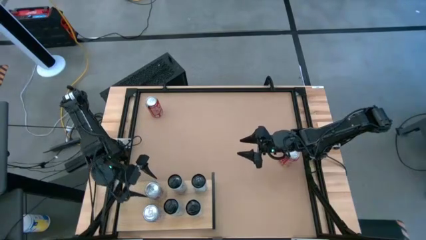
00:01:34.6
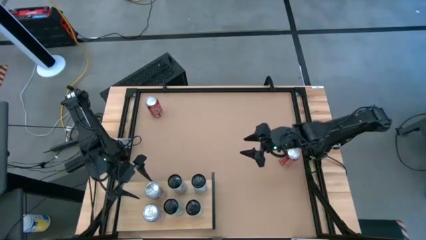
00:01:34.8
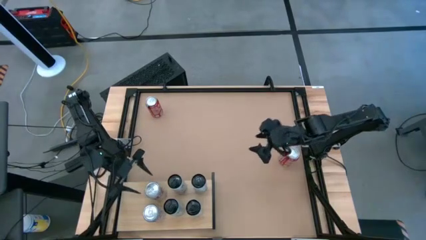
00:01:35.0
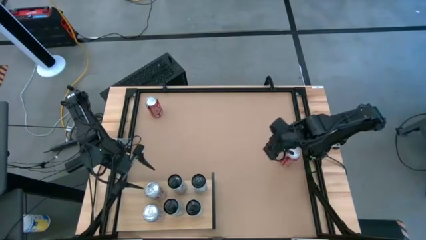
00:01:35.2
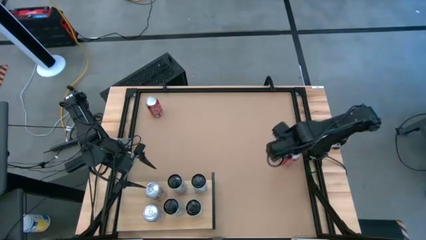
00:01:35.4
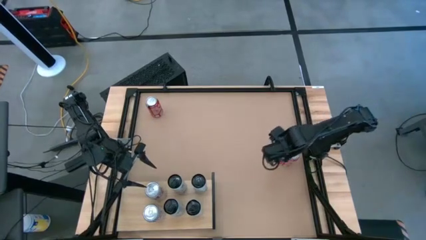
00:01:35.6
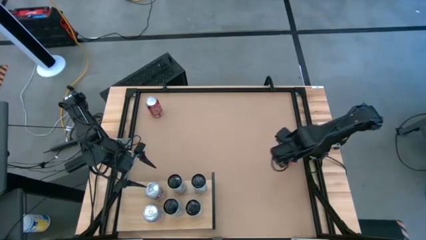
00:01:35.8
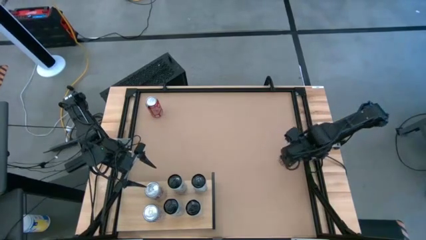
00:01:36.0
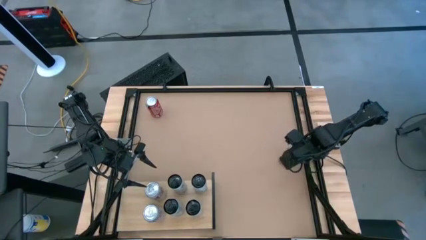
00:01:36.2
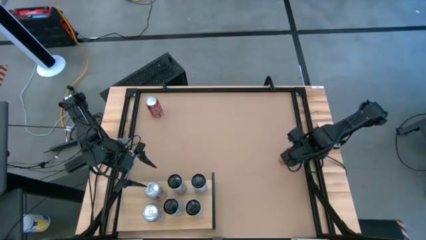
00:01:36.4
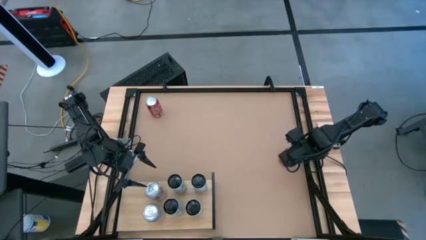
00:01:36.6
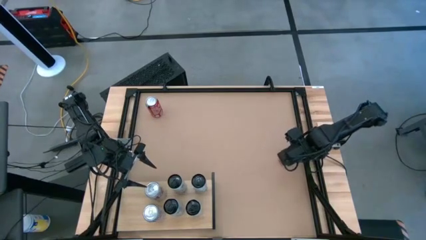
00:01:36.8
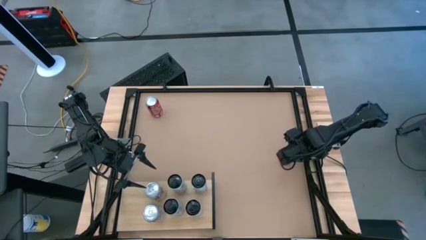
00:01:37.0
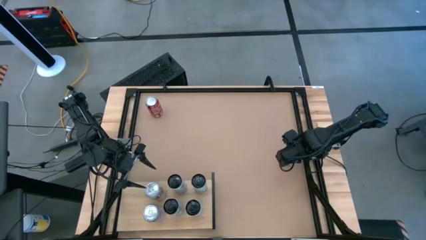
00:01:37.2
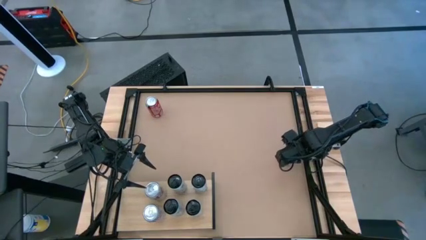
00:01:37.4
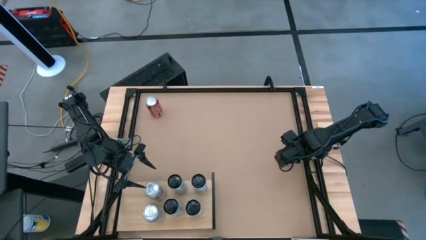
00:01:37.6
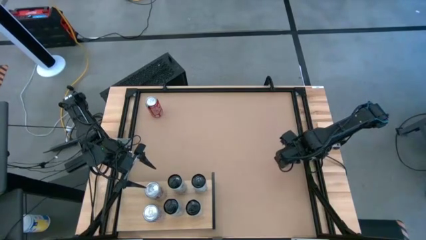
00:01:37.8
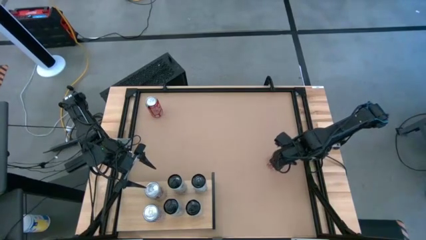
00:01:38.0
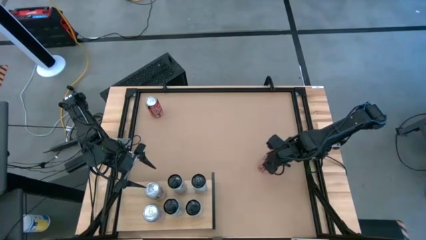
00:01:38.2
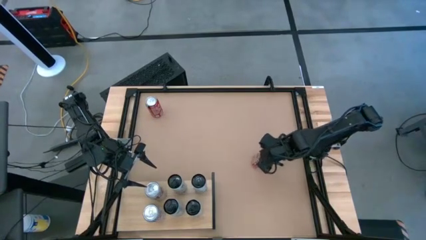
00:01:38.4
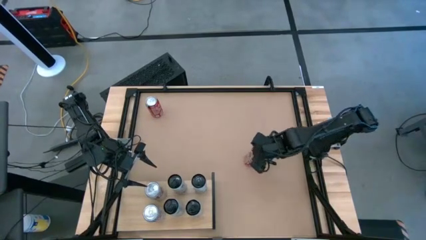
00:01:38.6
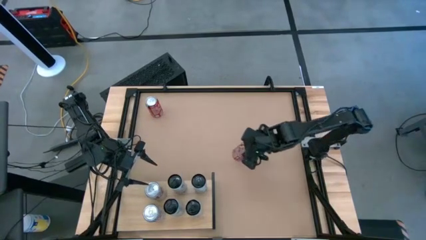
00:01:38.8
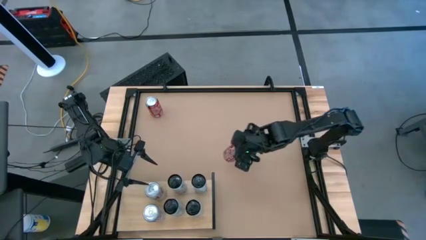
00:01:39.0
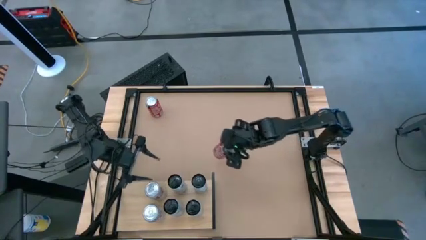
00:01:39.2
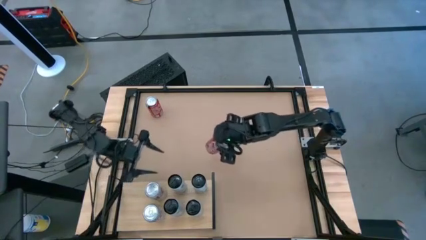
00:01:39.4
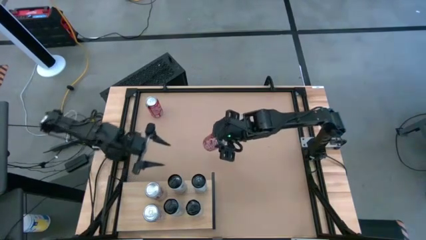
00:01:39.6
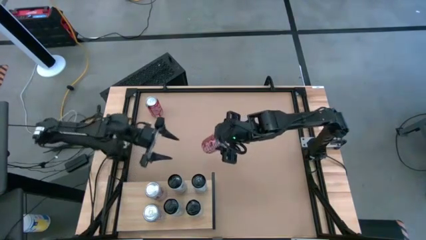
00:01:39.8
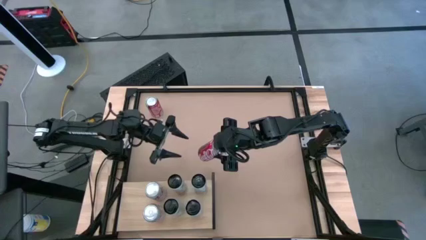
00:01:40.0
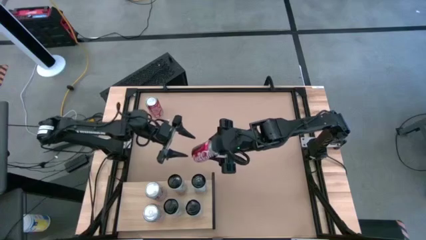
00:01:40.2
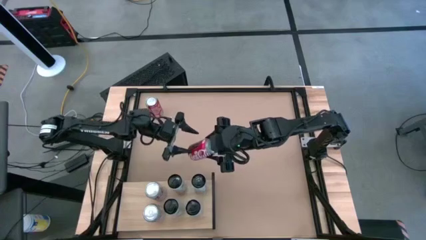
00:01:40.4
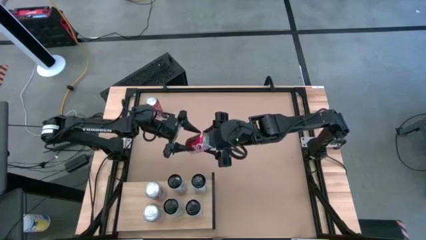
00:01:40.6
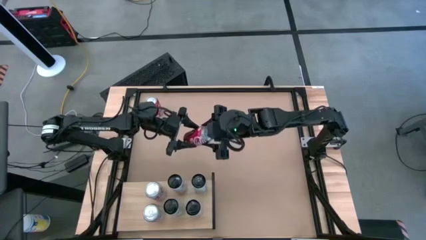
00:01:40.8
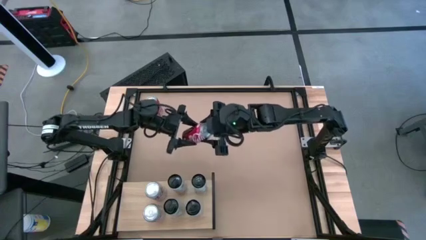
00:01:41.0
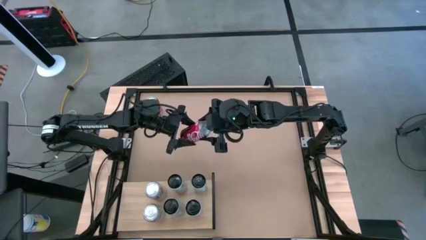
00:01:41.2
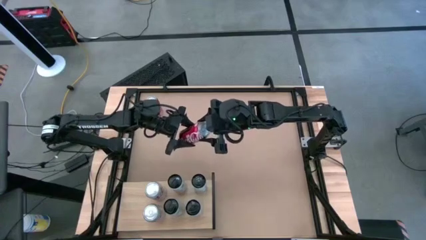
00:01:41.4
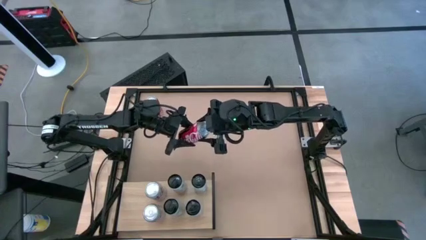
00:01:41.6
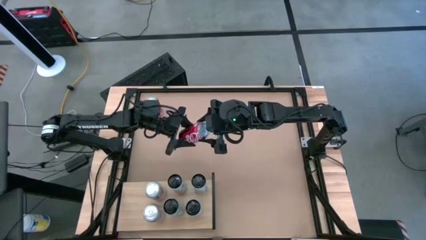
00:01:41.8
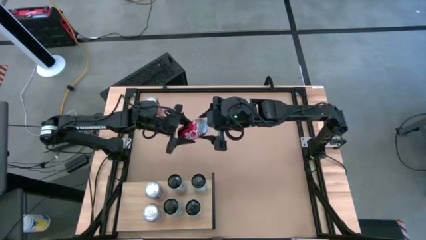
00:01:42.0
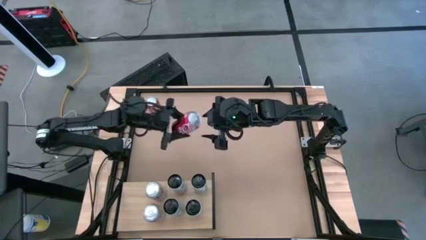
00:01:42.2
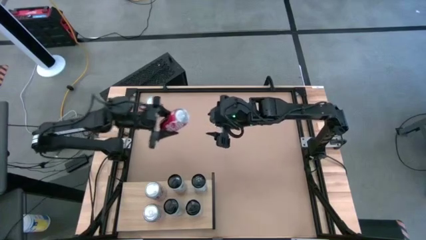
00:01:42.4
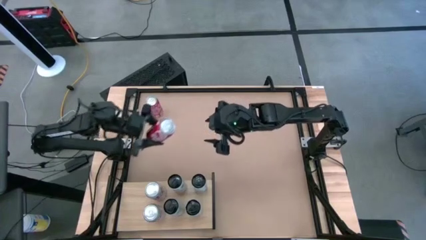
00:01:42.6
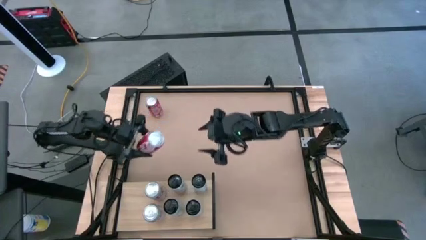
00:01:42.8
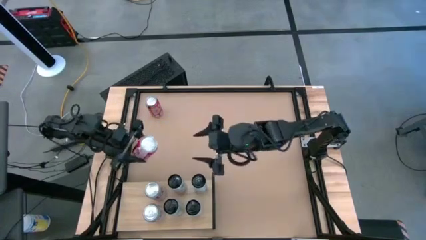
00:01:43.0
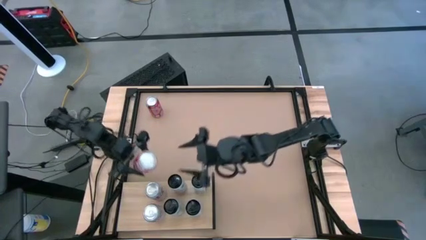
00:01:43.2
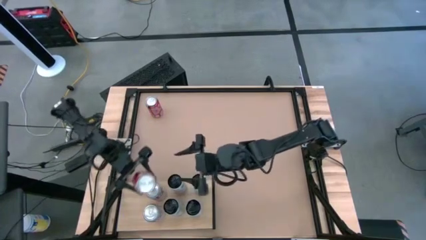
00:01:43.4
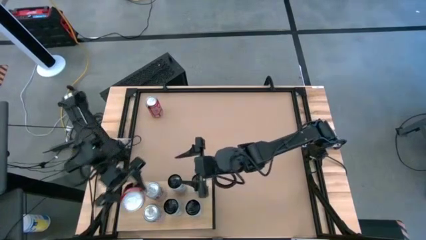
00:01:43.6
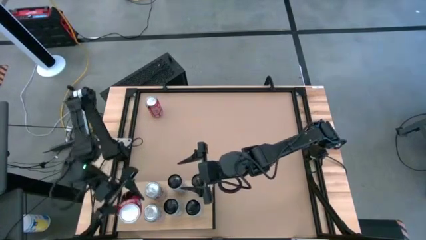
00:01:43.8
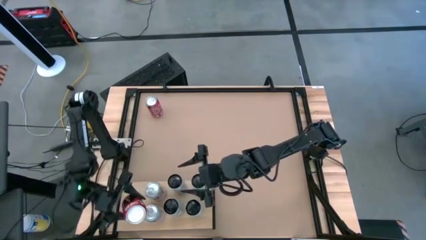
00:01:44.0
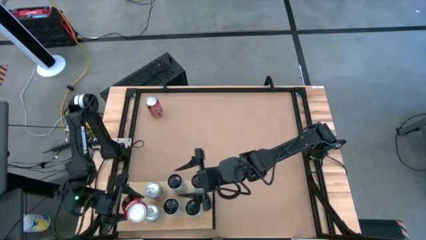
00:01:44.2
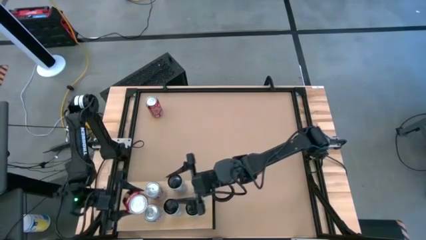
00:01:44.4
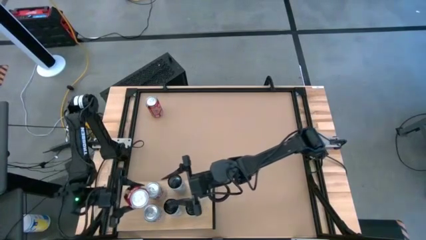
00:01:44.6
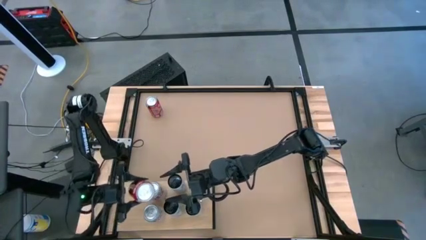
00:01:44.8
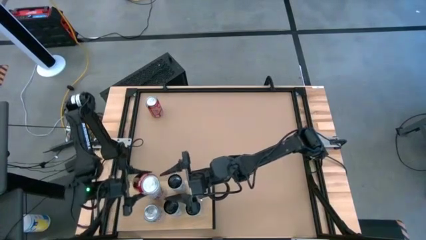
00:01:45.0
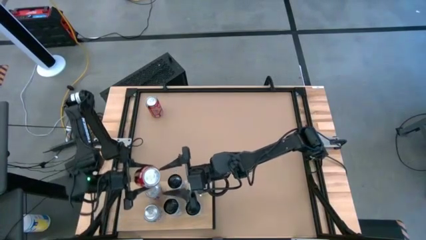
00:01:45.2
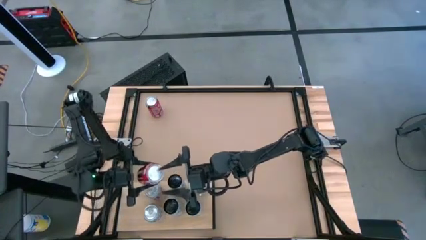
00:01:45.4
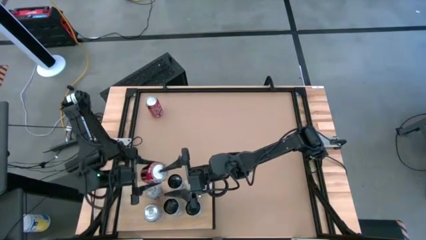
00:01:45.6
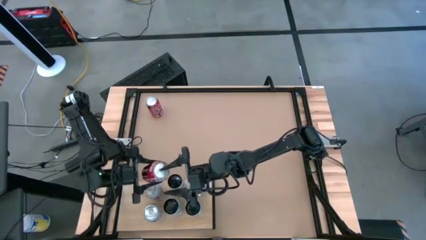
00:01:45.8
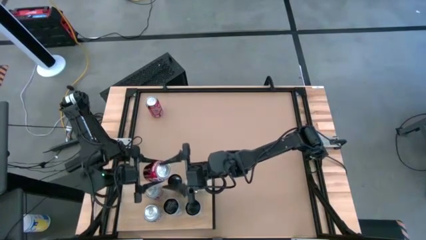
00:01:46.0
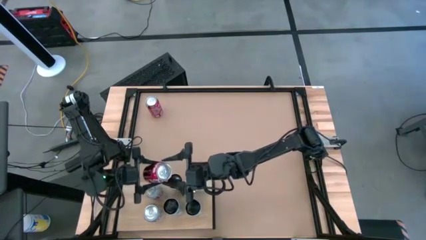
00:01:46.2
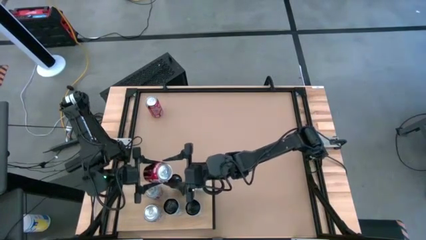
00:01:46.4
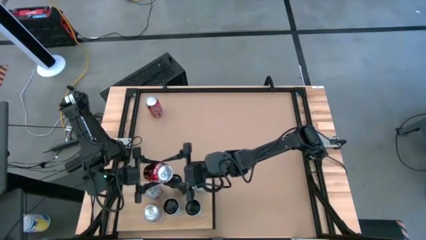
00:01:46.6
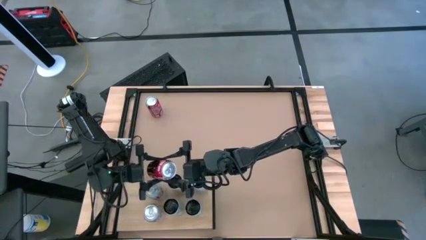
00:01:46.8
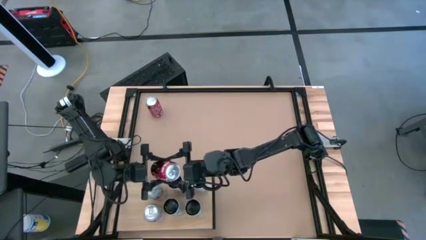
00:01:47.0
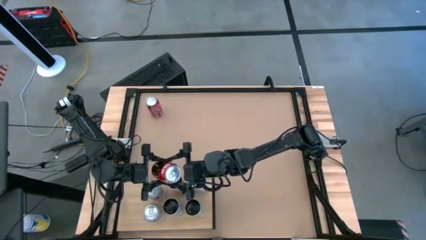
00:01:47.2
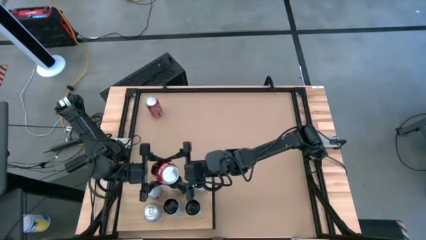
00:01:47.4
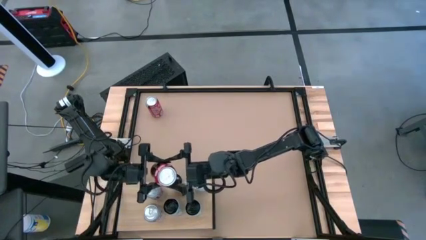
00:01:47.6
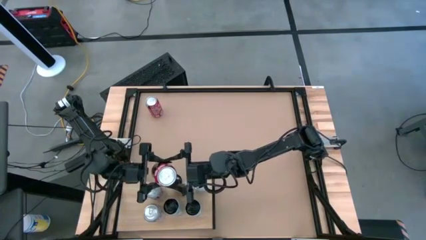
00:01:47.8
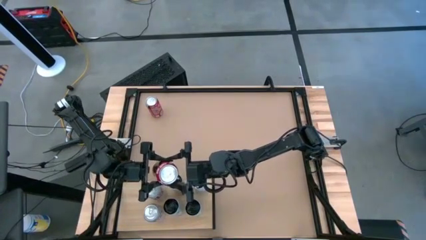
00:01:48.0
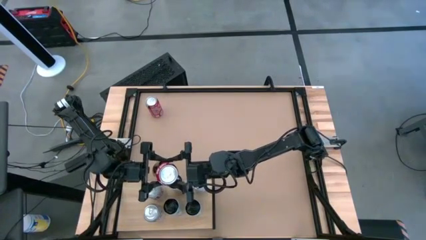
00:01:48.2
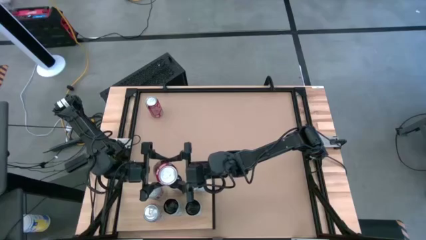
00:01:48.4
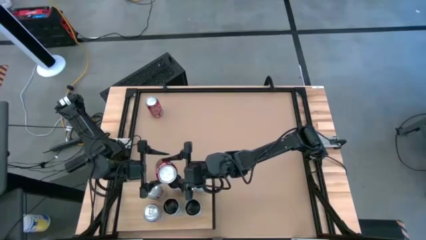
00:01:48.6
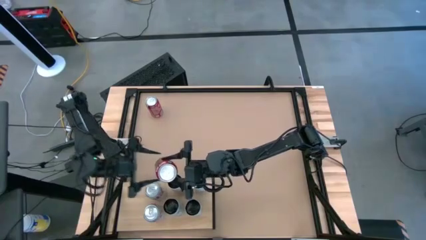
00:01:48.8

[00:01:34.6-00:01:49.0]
Task: Place canned beverage on shelf
Put the right red soda can on the shelf
